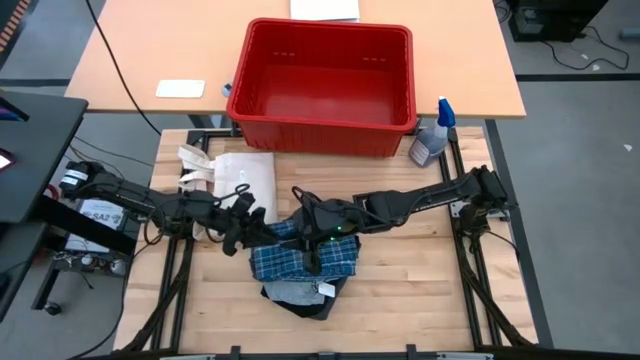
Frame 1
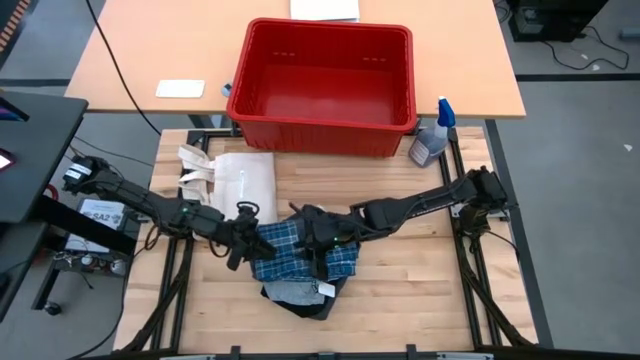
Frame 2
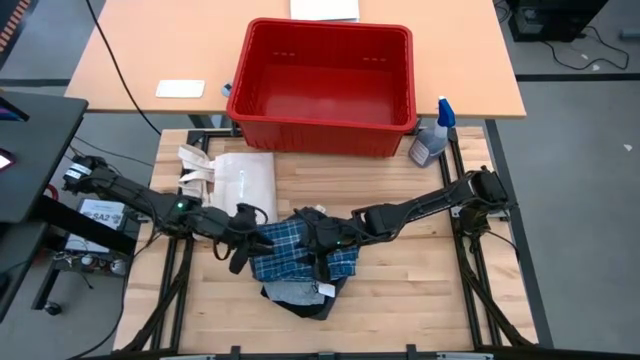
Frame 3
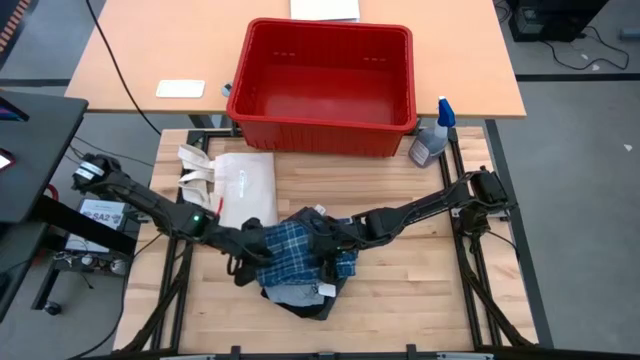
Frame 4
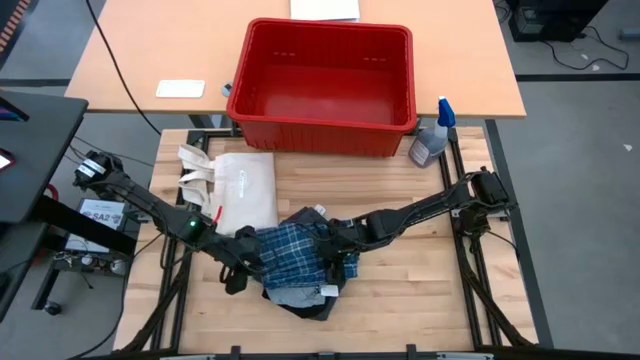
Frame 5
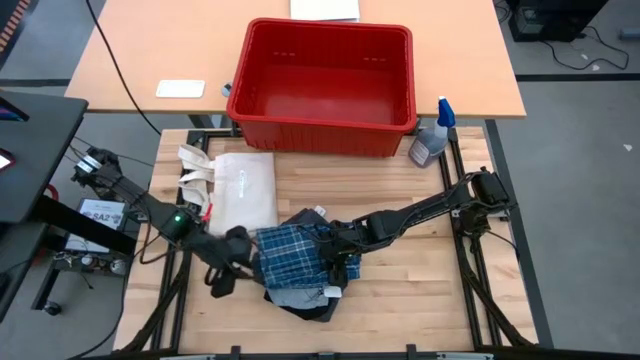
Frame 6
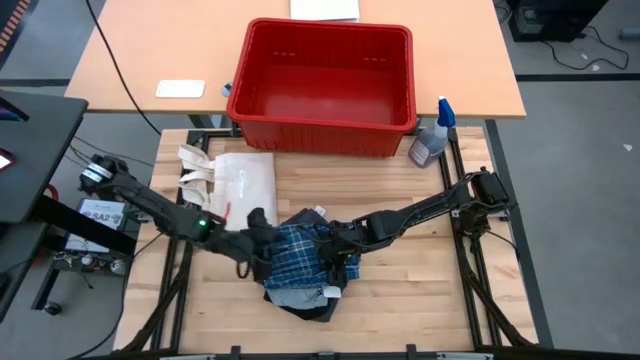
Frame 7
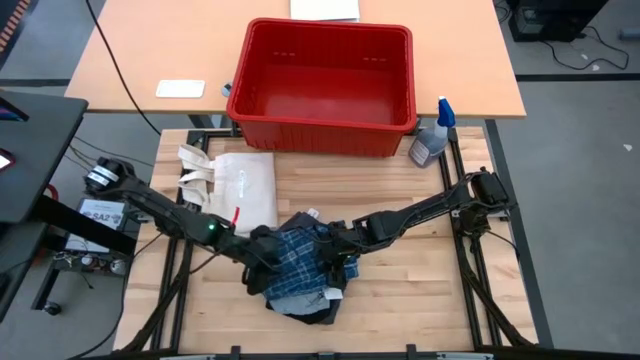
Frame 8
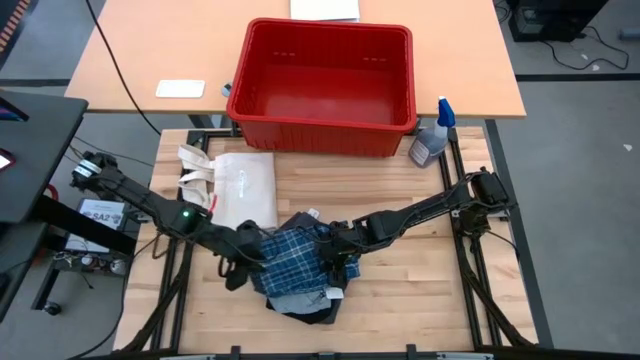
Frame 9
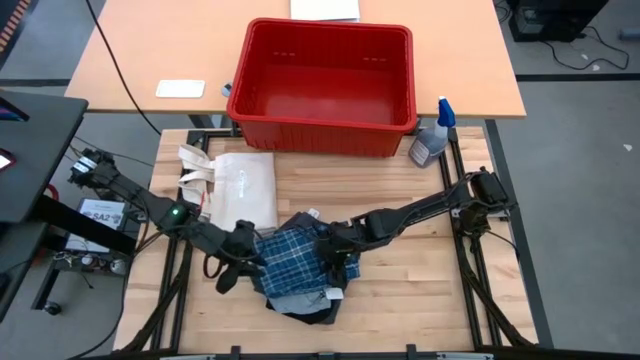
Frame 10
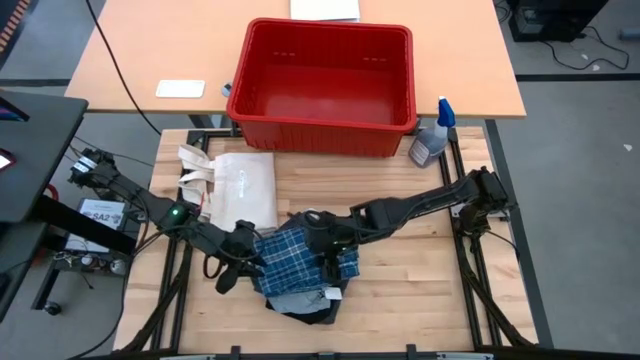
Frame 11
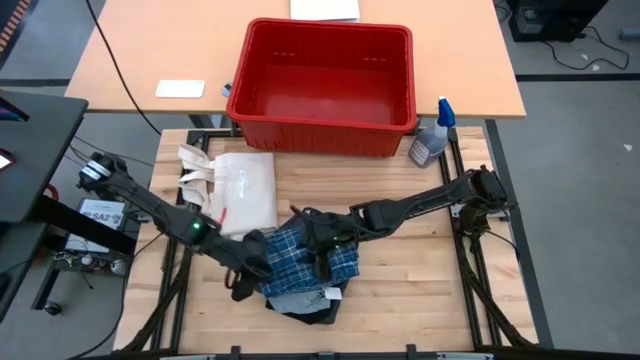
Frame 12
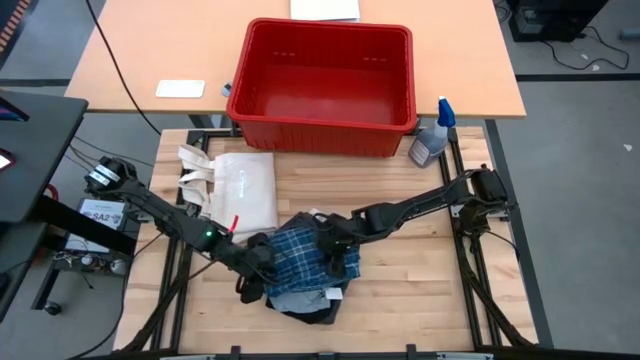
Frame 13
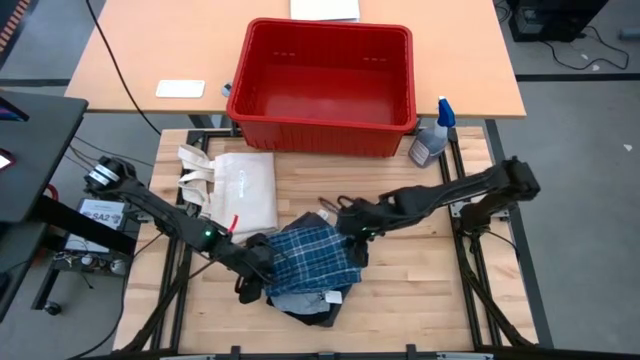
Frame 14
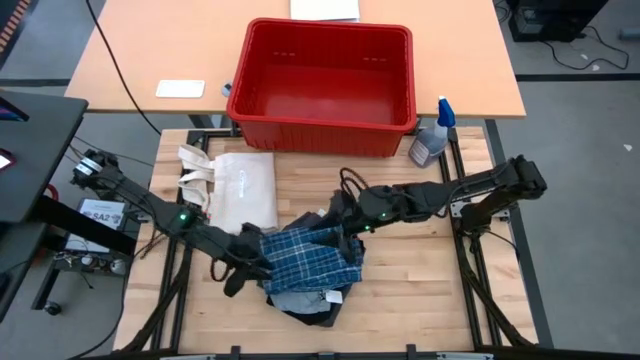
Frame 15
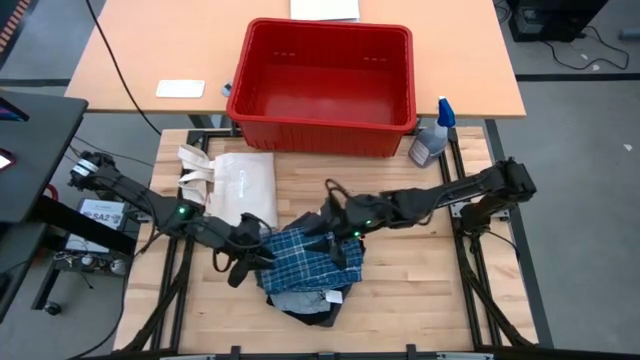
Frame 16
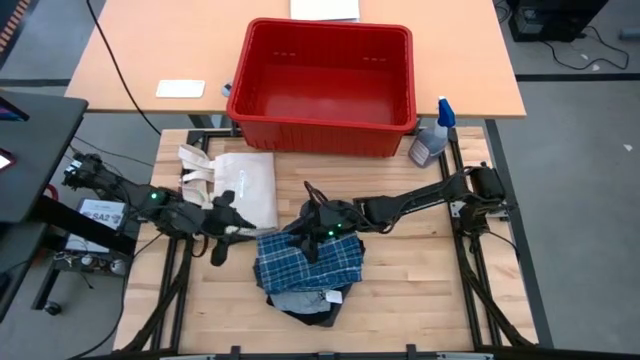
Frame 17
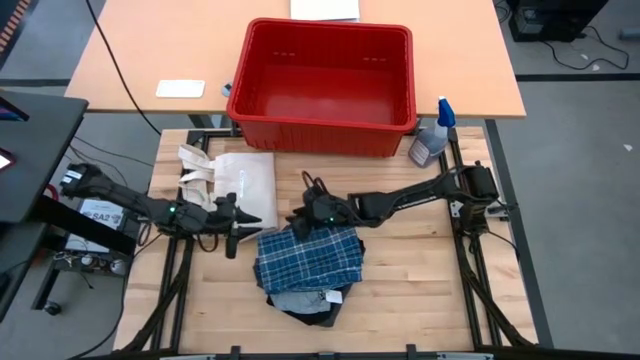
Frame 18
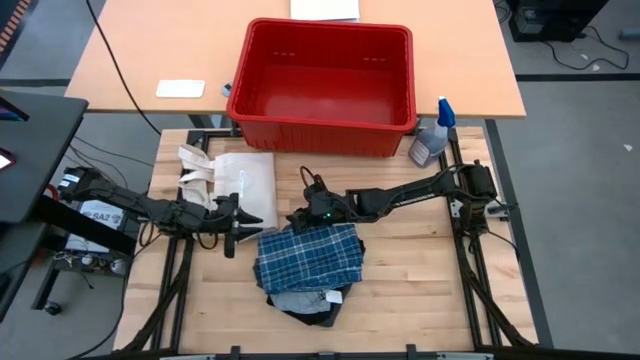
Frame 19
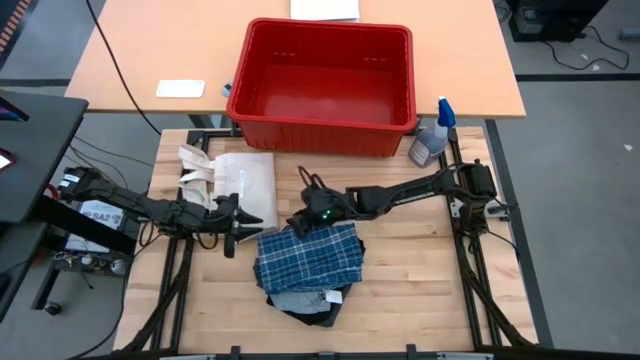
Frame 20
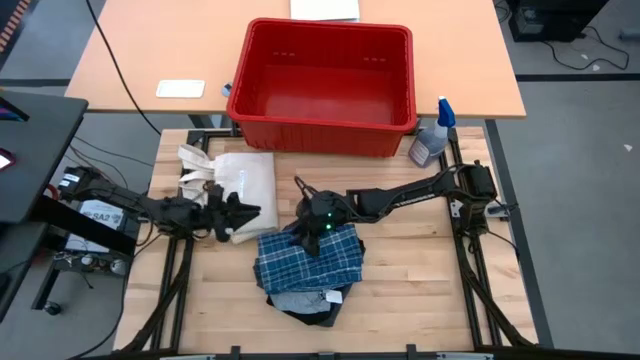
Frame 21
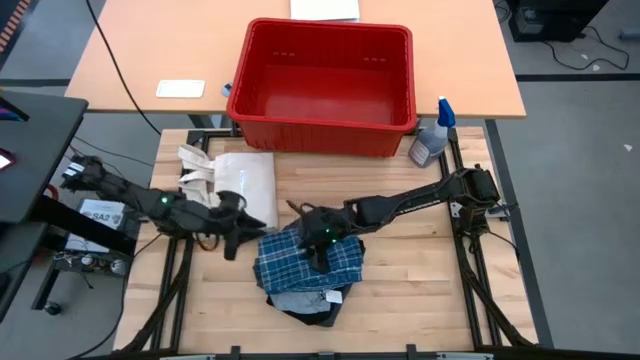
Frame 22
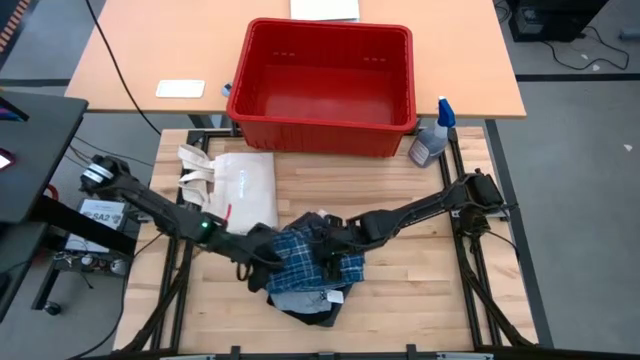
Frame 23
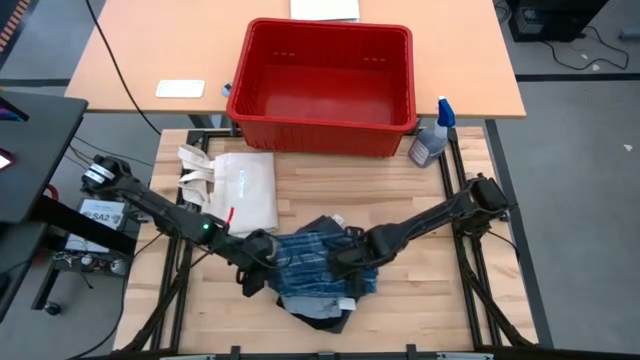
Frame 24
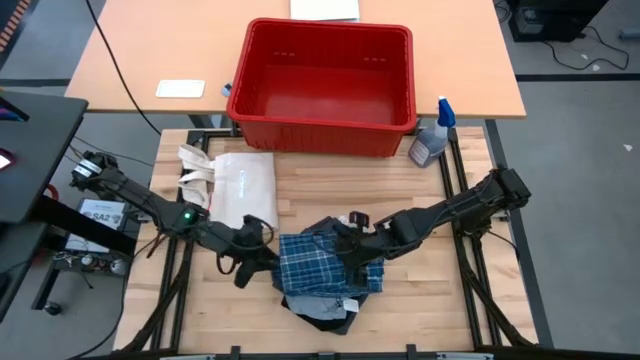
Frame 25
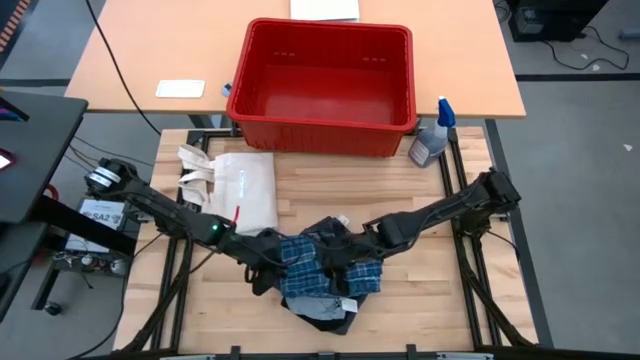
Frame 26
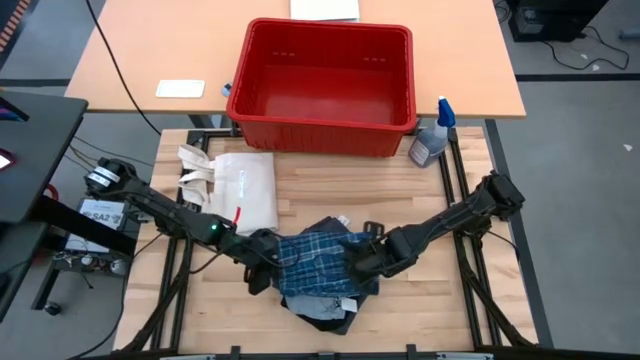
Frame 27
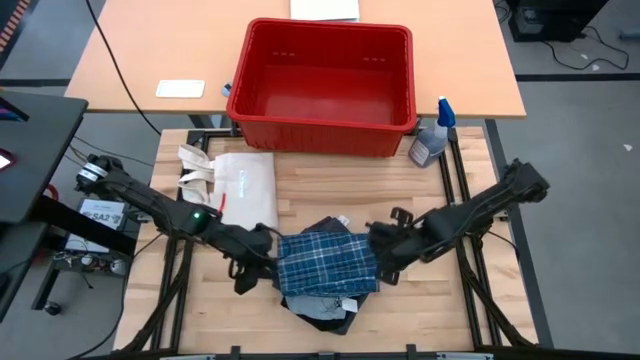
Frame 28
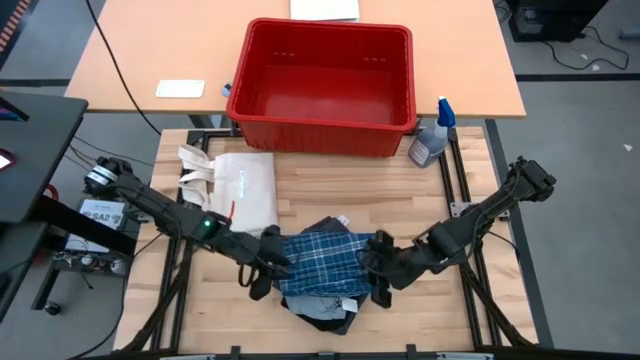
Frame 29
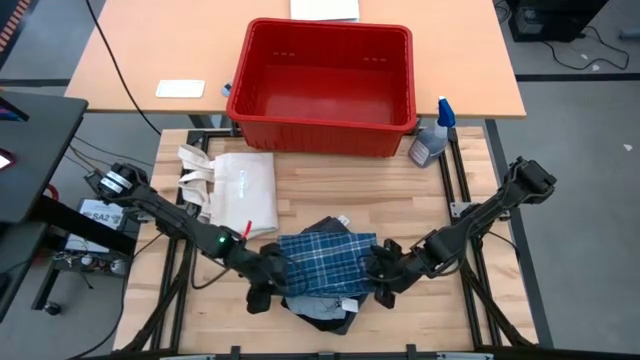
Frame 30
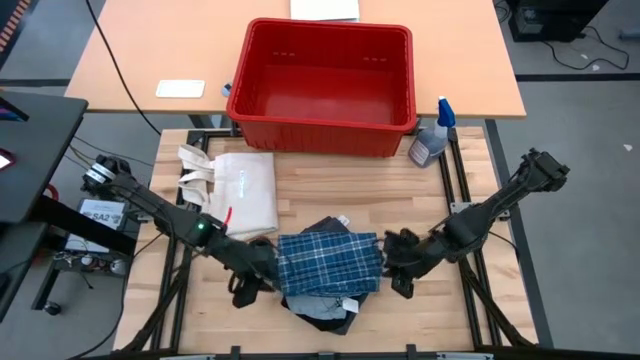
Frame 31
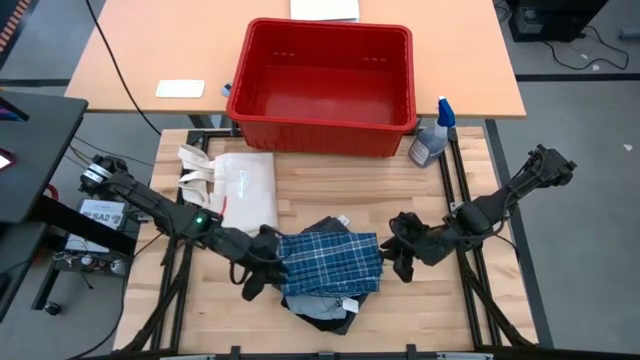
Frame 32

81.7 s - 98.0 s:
Task: Sort clothes
Adjust the blue pants on top of the stacked clothes

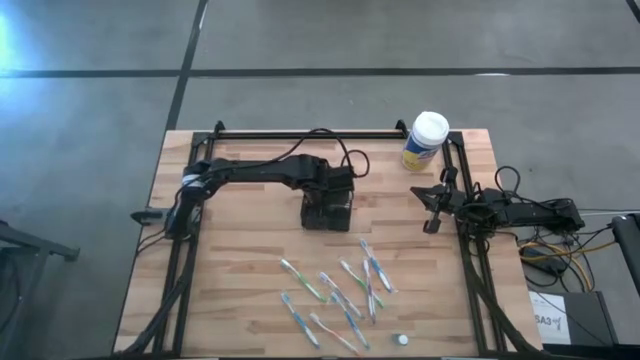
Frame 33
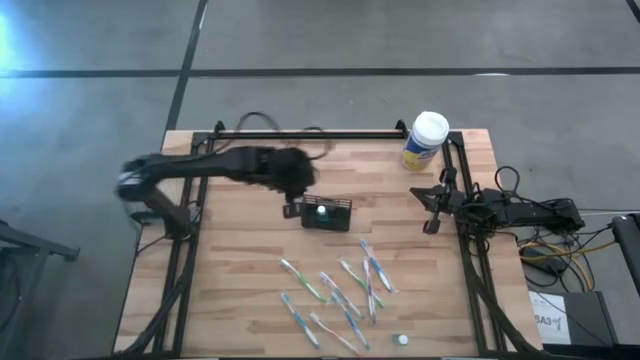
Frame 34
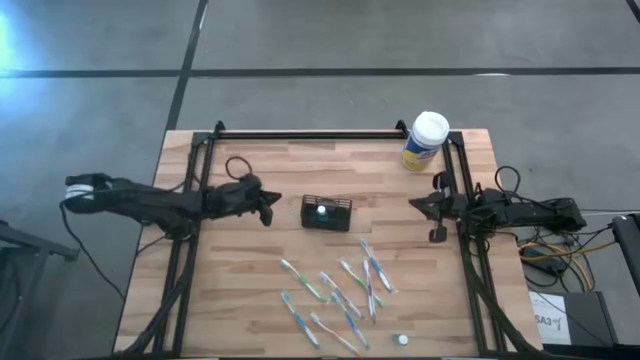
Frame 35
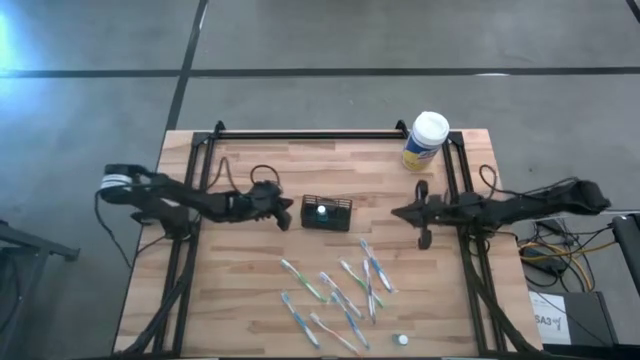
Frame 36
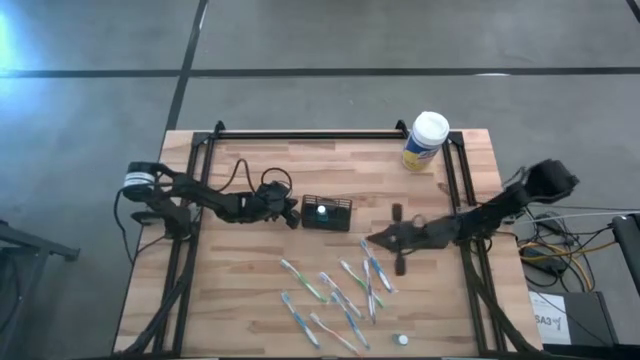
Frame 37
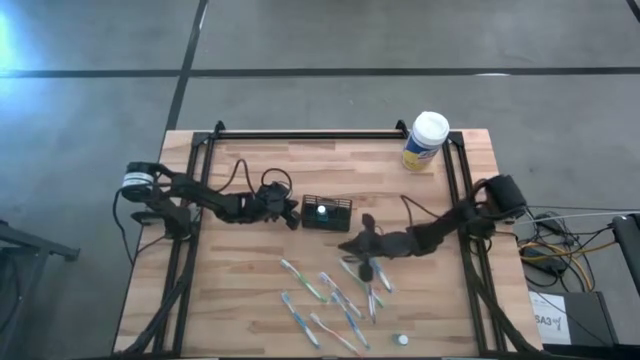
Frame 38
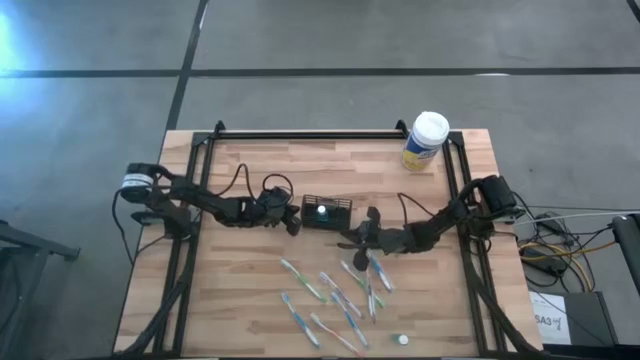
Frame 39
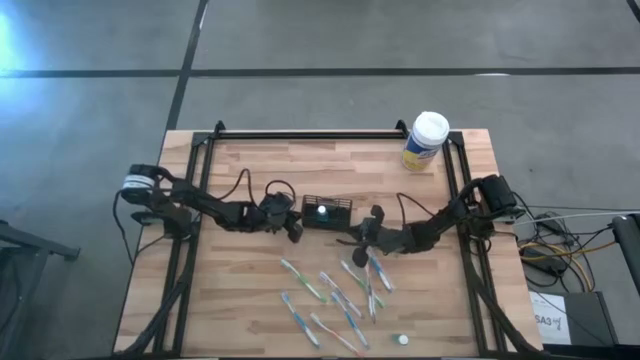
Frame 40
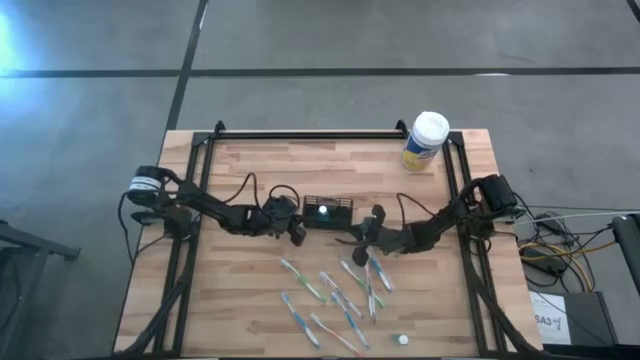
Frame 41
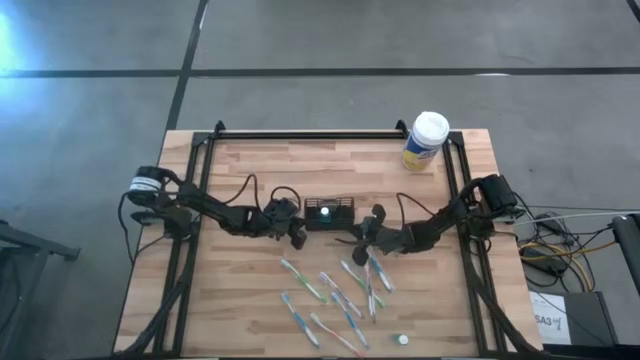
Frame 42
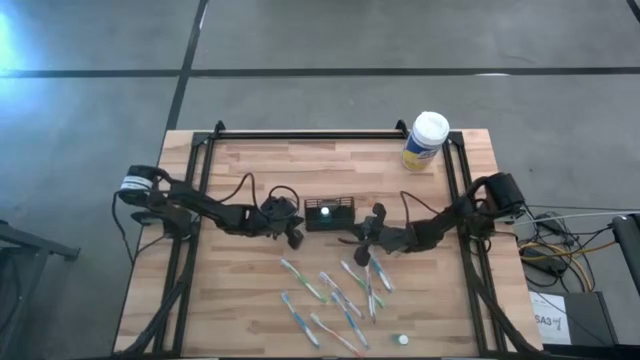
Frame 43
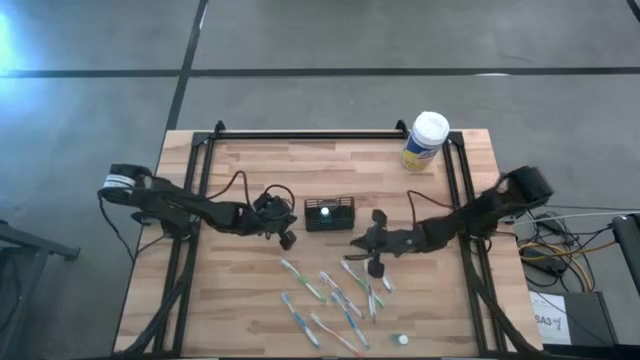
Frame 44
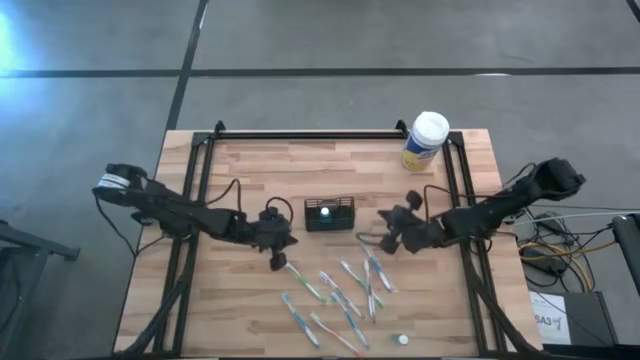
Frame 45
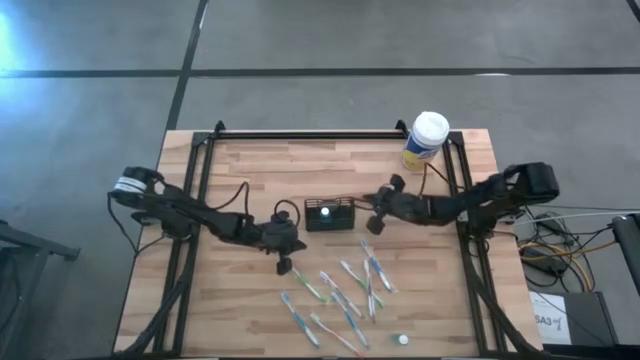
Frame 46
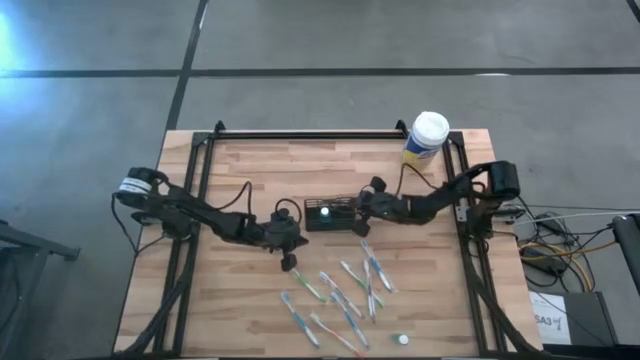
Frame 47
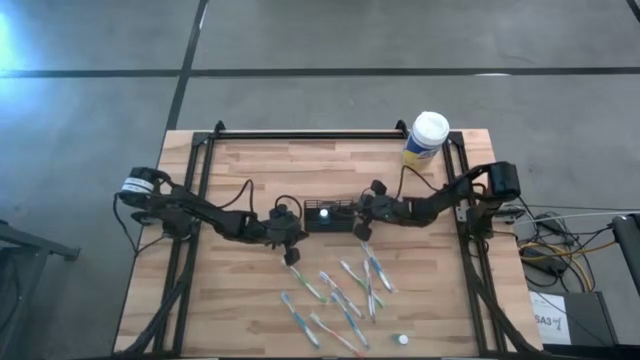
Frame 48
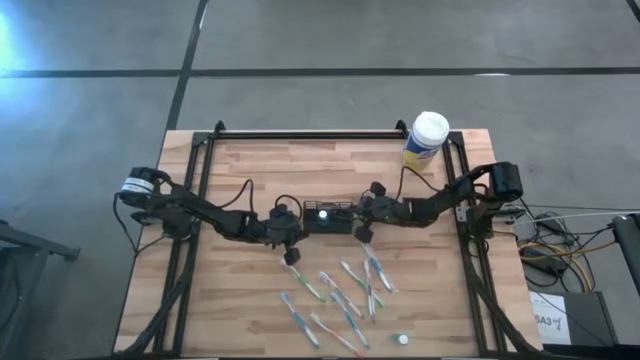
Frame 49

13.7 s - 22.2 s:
Task: Pick & Place toothbrushing station
Adjust the black mesh organizer
